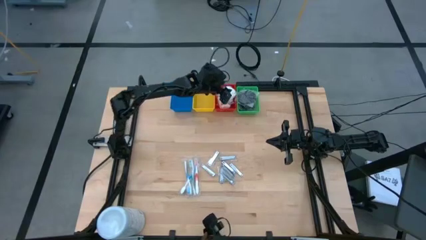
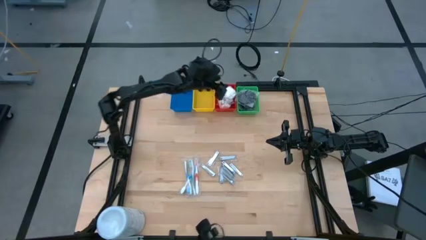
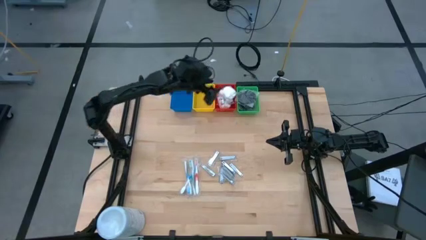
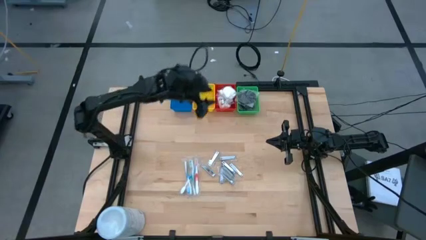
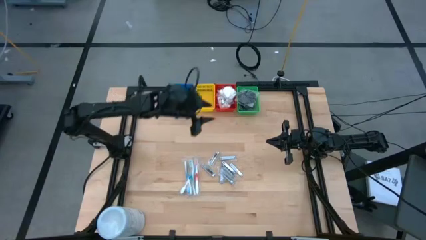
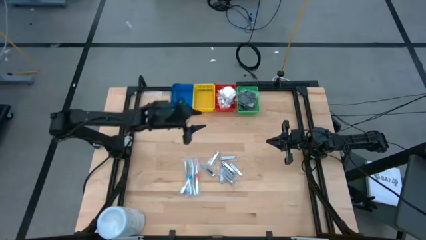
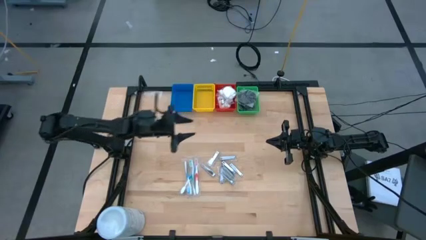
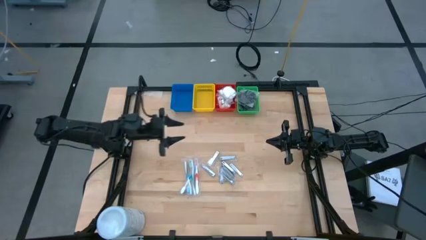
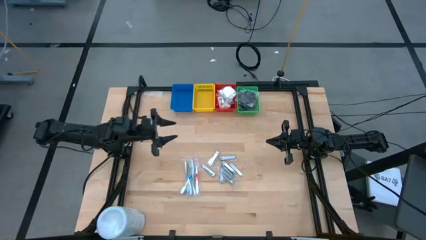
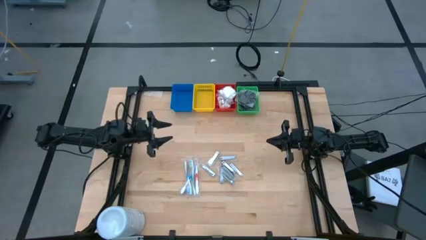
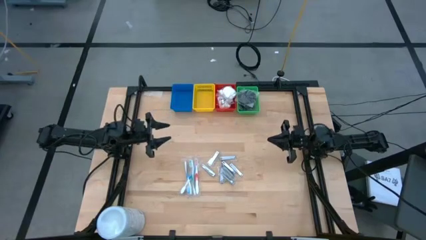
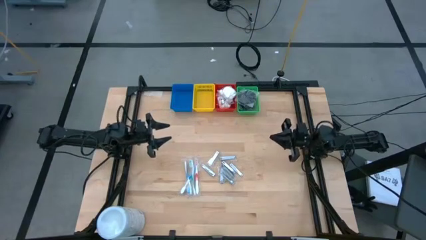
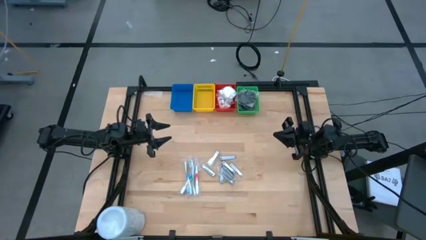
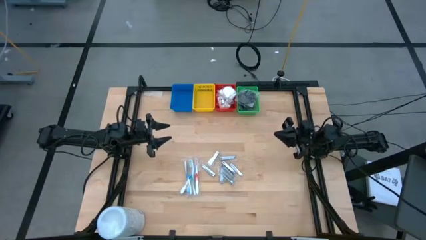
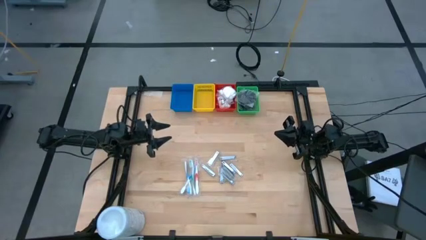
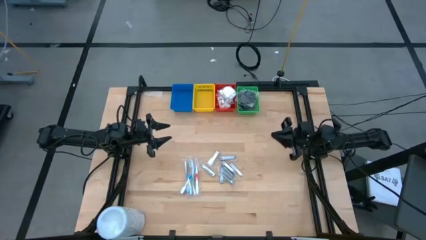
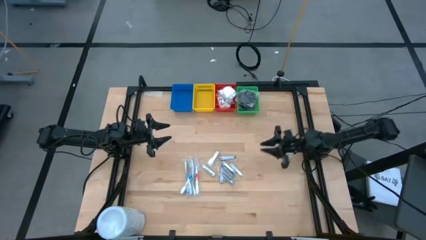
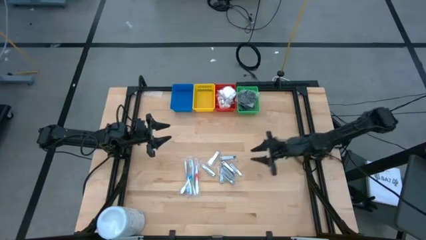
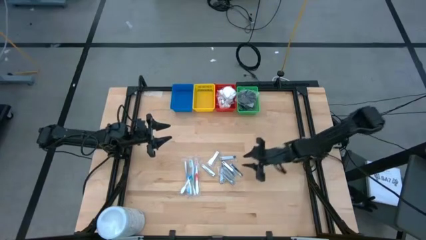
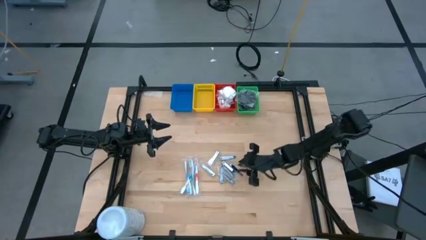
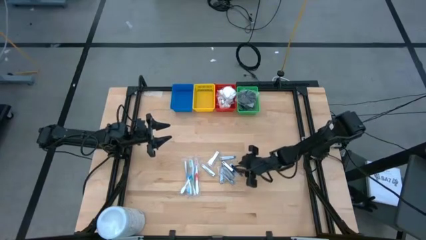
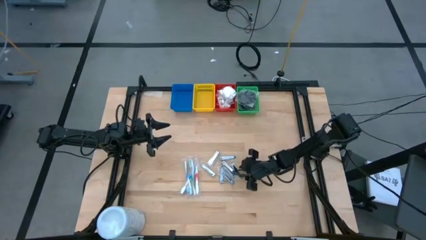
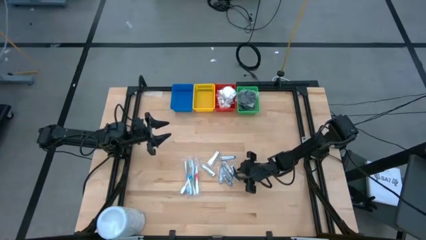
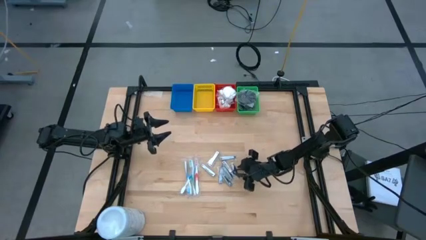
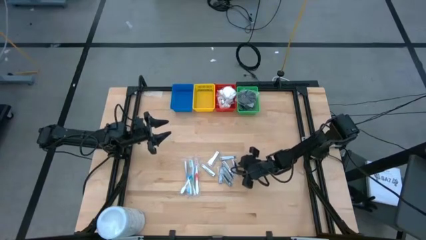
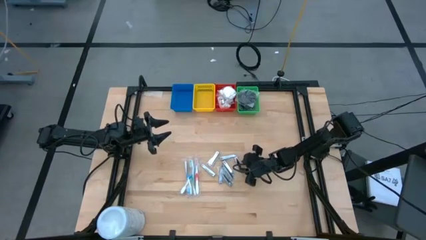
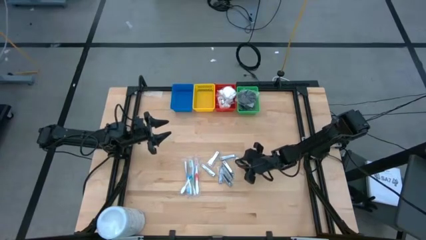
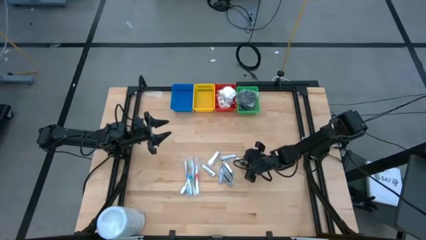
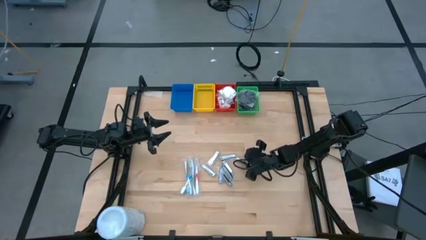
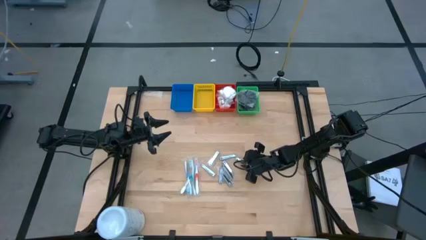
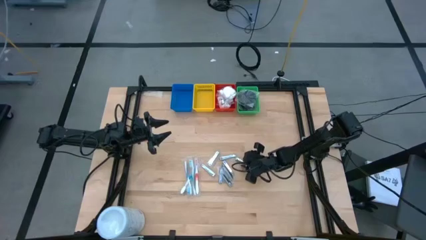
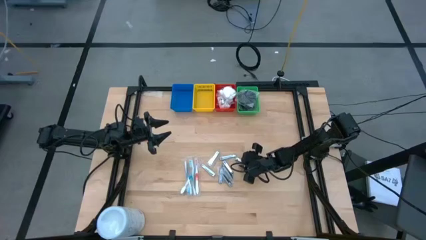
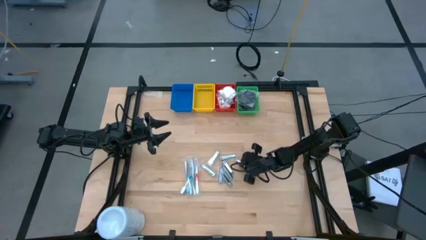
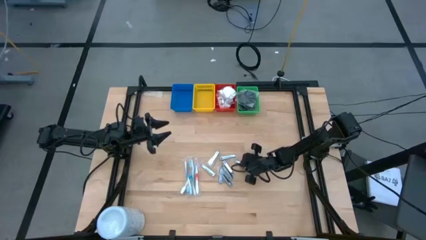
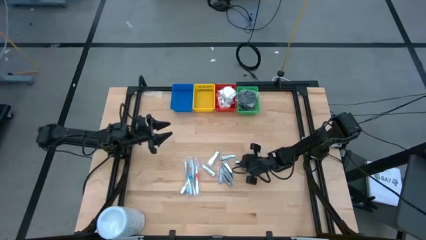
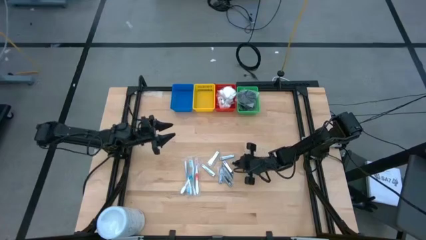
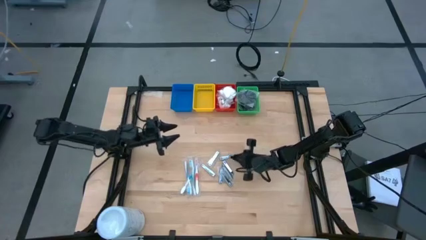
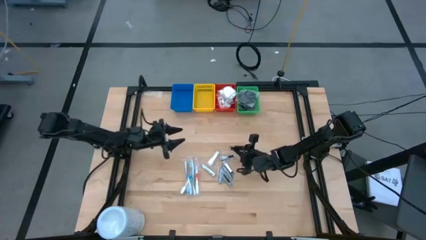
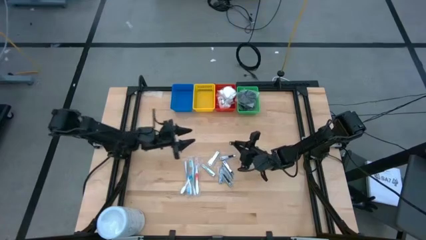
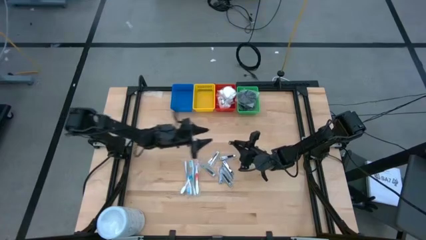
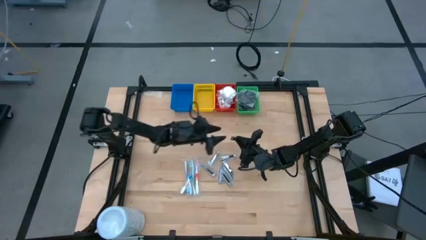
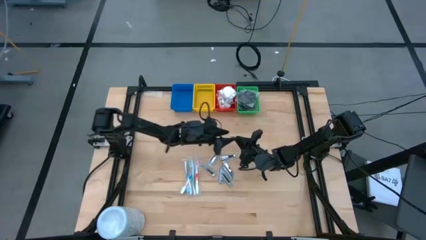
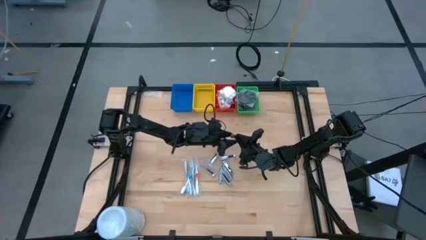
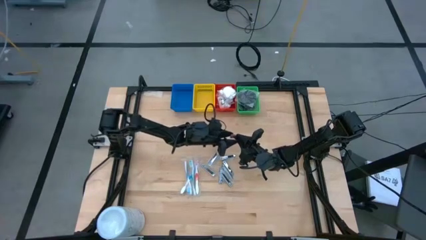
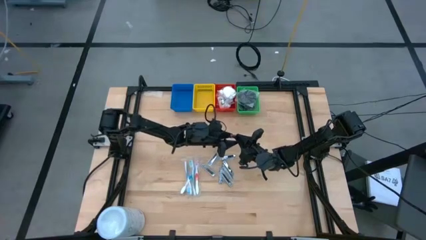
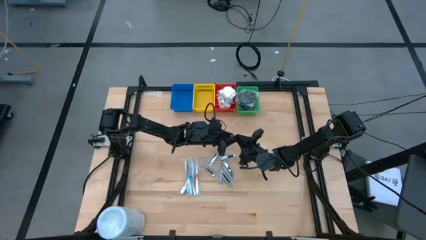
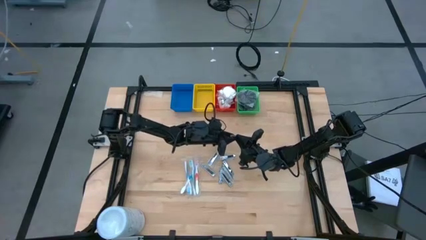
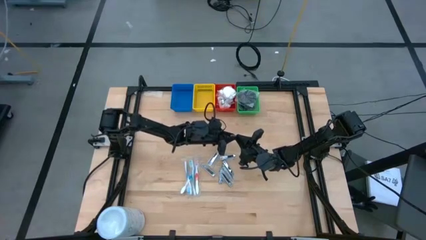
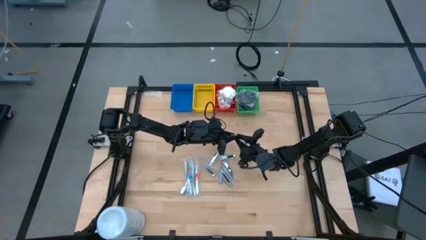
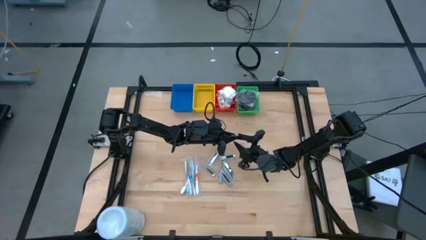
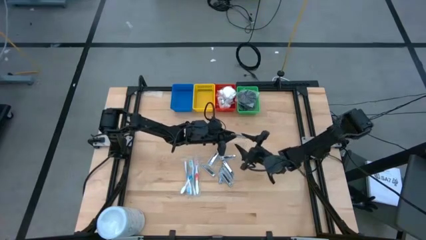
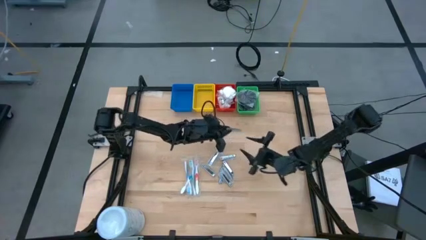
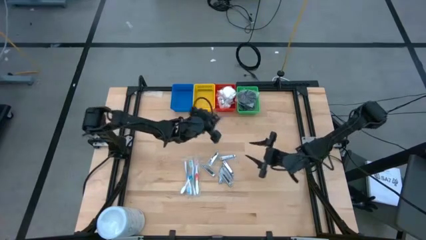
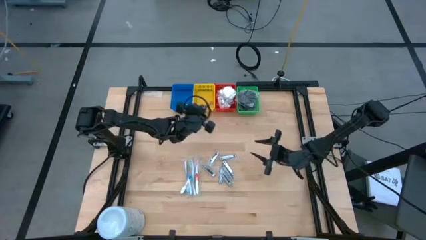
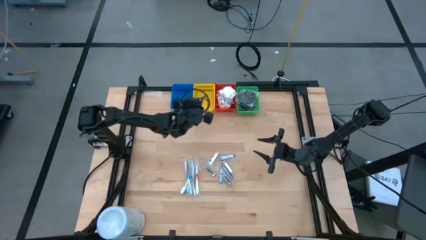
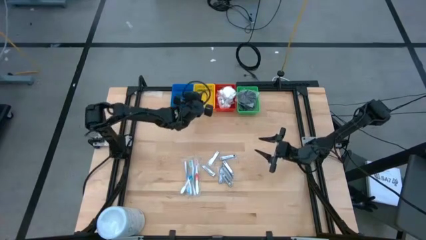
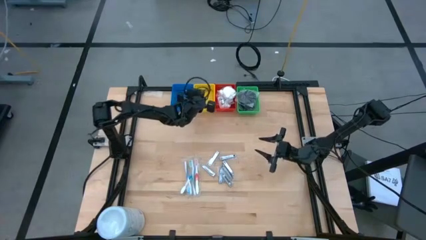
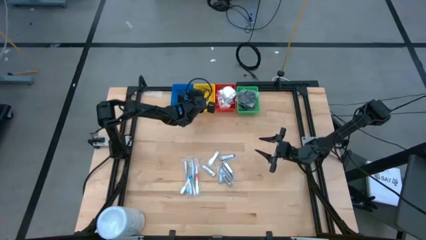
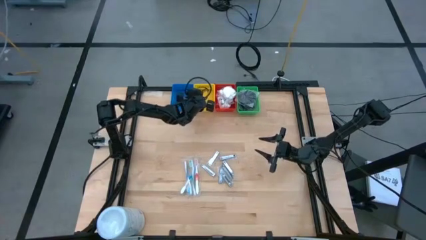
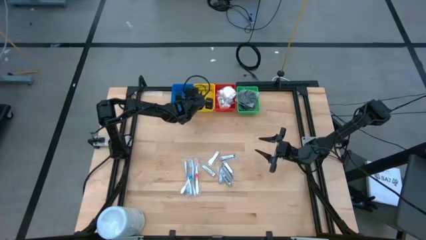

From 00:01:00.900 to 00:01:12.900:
Task: Pick & Place Travel size toiletries
Put the nail cutter into the yellow bin

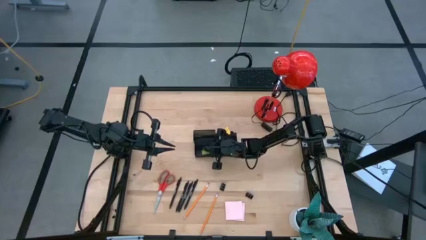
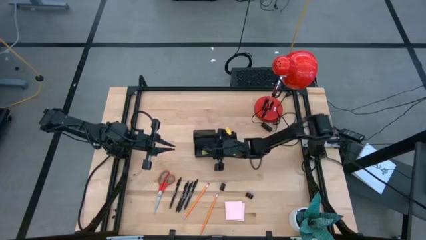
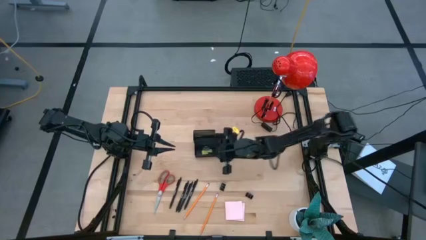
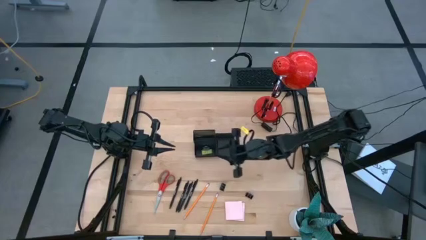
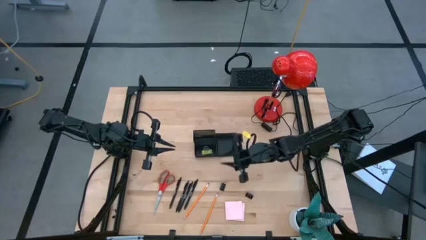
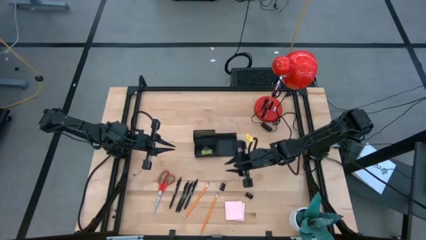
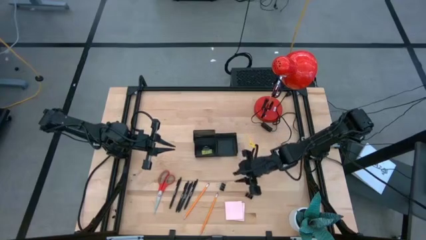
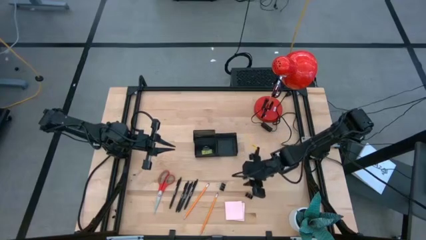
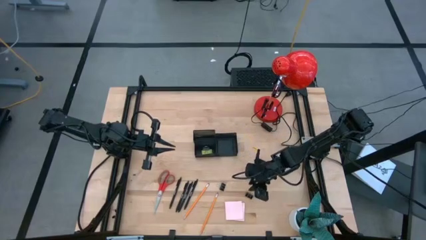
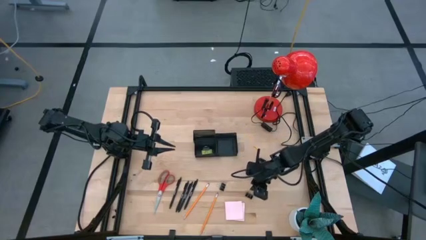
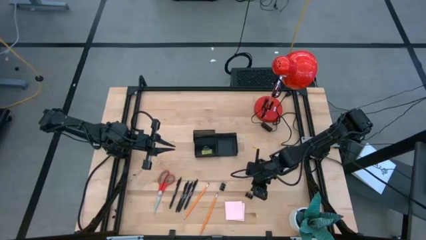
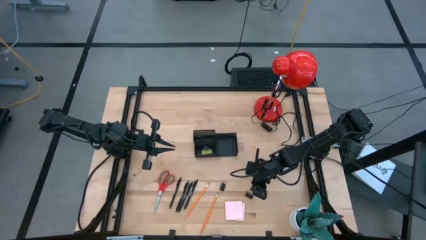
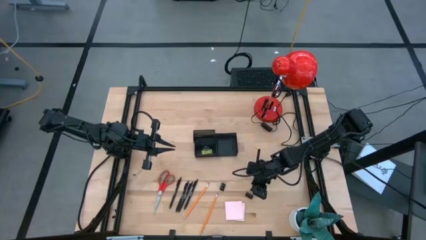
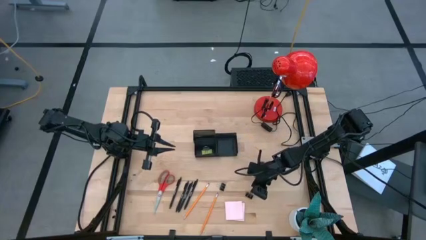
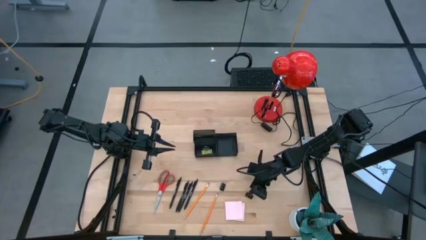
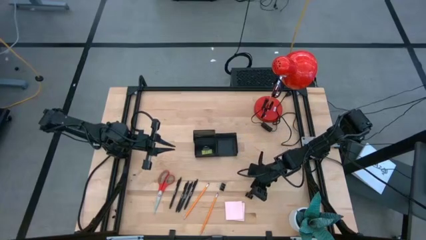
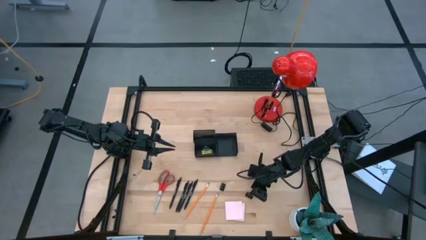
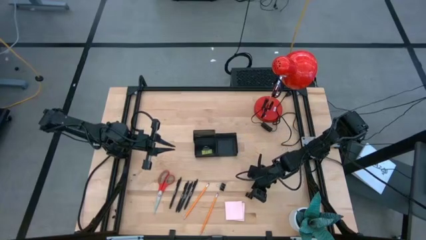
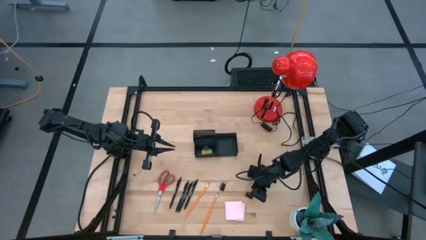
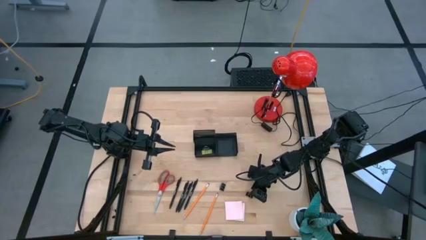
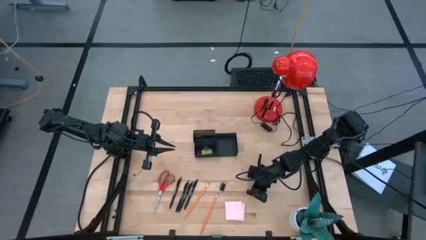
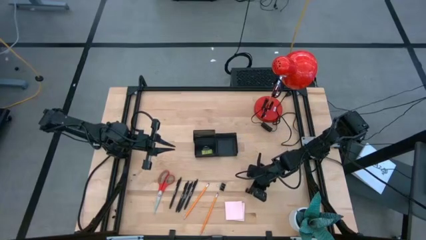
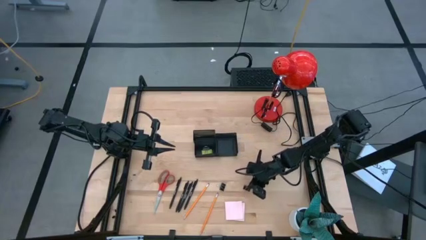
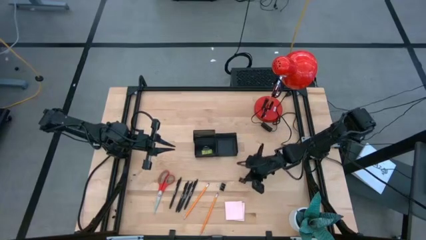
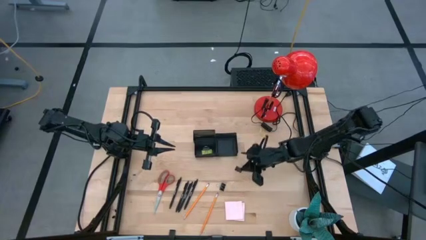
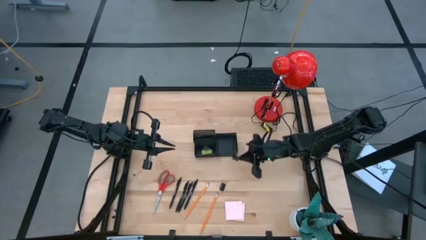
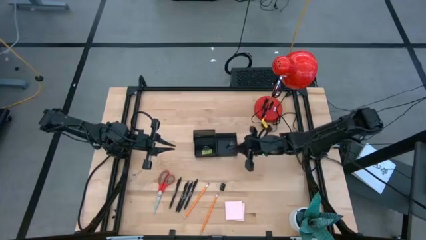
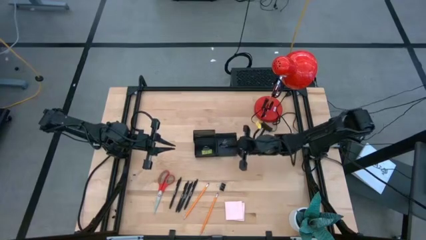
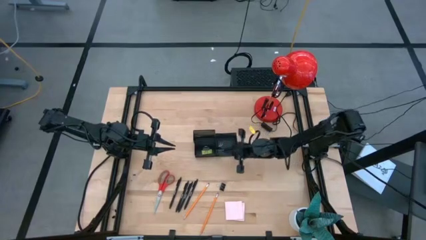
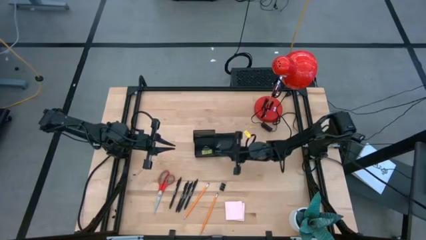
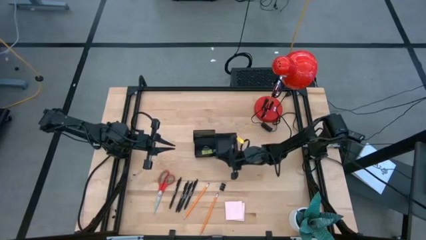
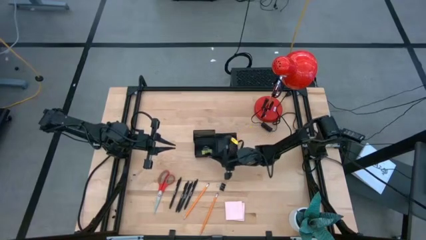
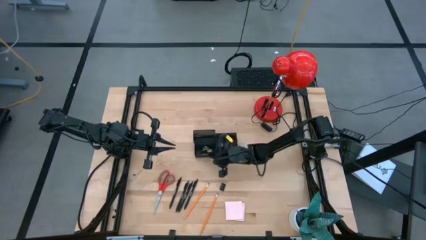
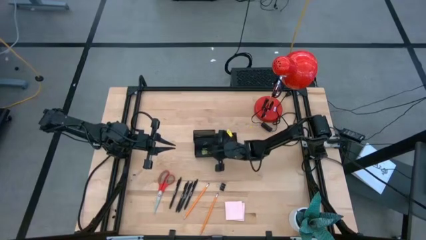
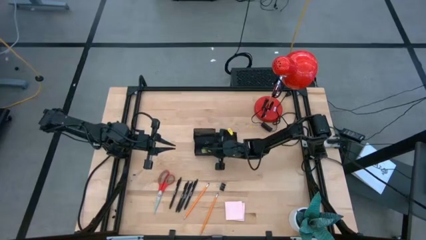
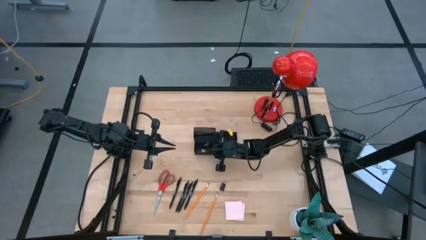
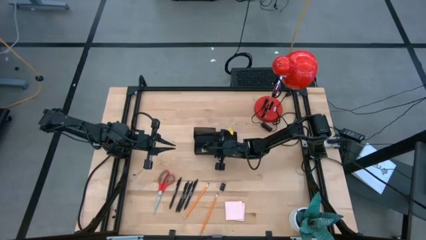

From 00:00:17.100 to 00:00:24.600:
Task: Pick and place office supplies into organizer
Put the right binder clip into the desk organizer
